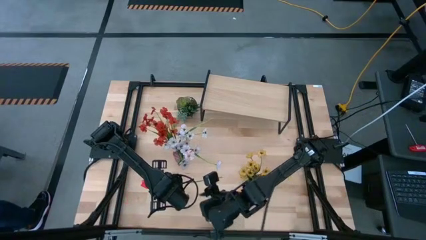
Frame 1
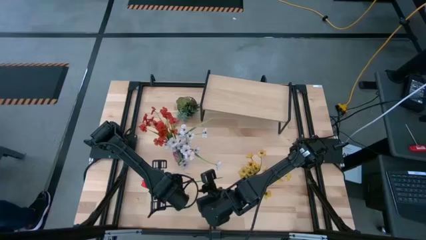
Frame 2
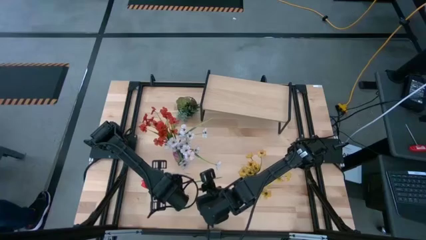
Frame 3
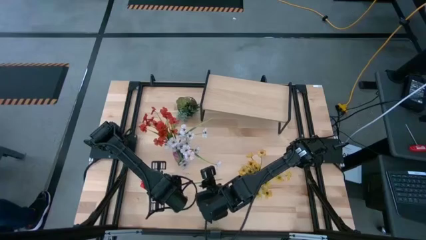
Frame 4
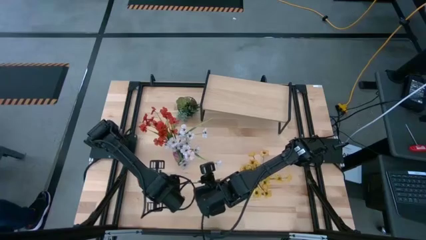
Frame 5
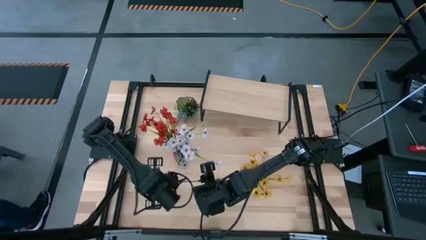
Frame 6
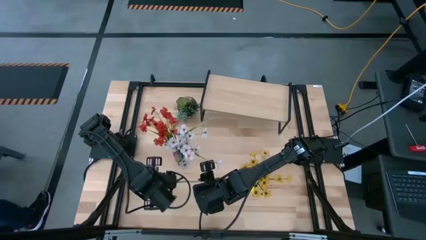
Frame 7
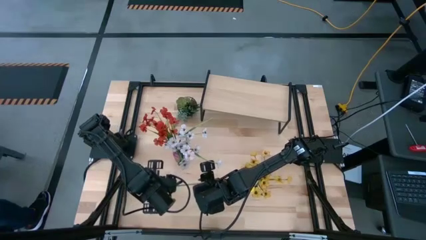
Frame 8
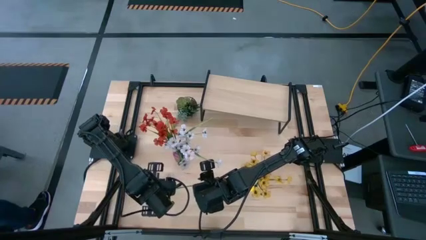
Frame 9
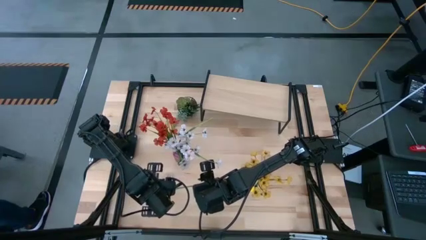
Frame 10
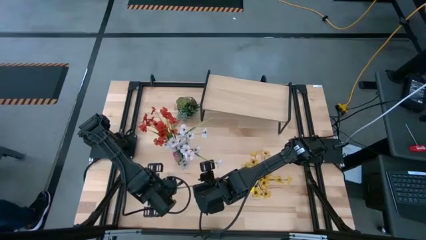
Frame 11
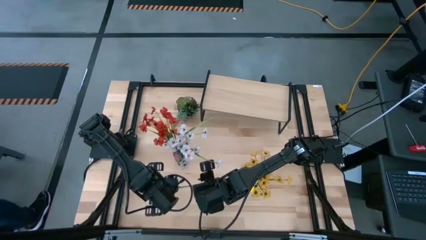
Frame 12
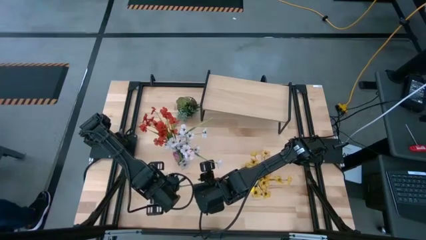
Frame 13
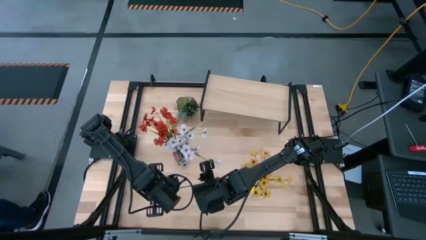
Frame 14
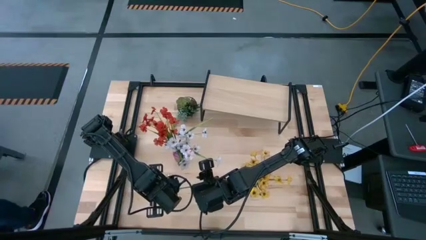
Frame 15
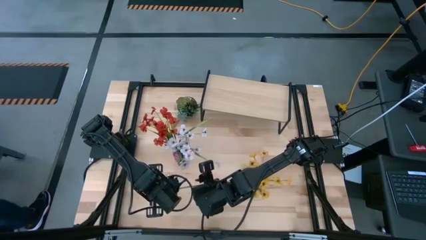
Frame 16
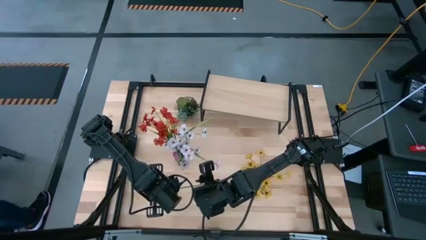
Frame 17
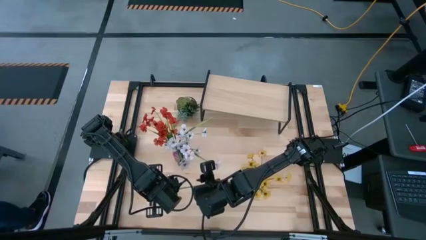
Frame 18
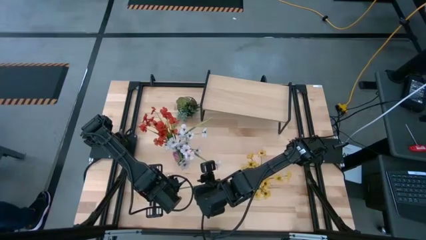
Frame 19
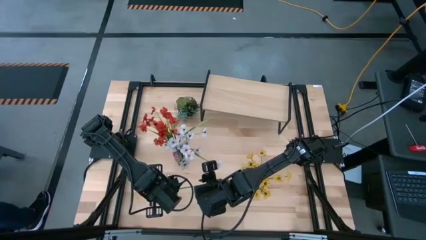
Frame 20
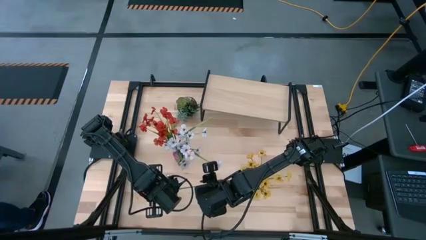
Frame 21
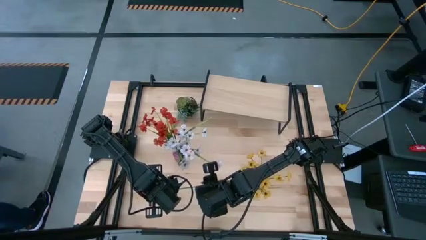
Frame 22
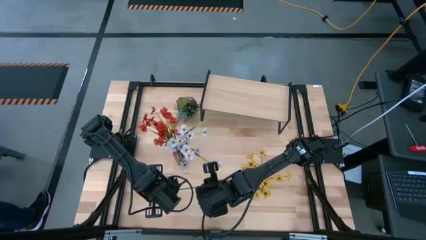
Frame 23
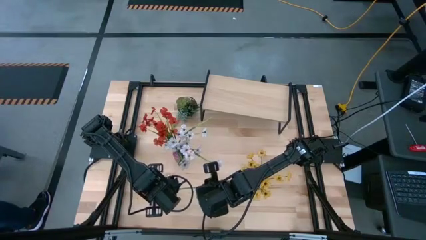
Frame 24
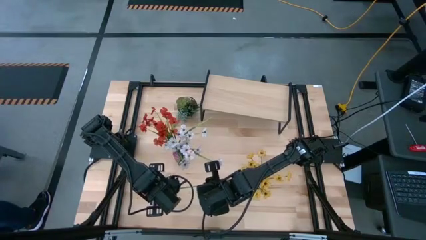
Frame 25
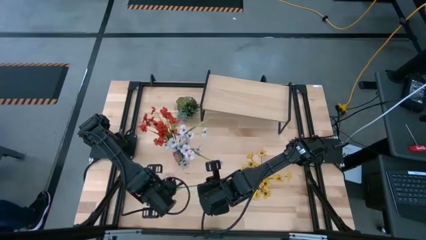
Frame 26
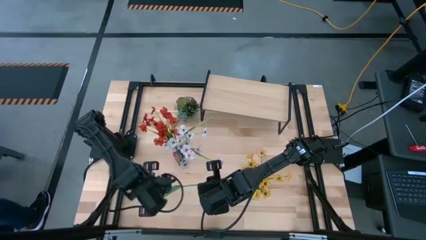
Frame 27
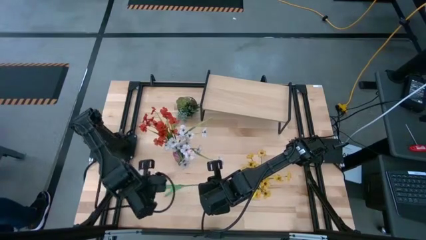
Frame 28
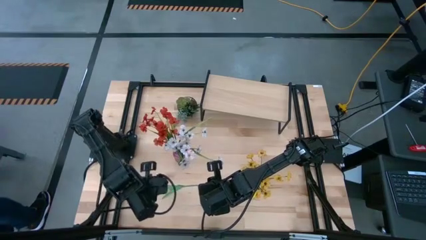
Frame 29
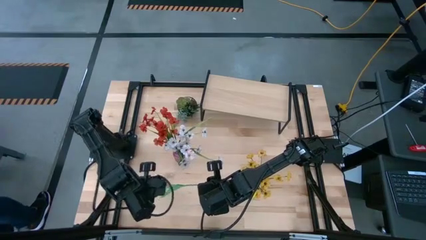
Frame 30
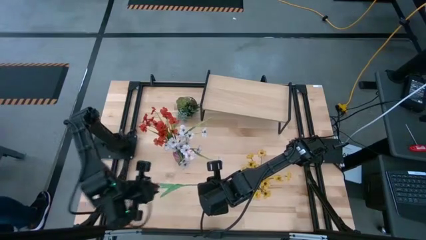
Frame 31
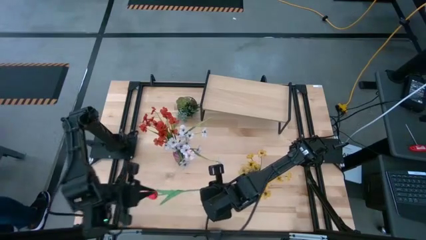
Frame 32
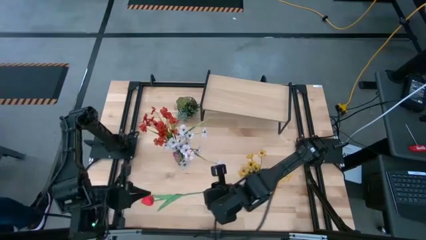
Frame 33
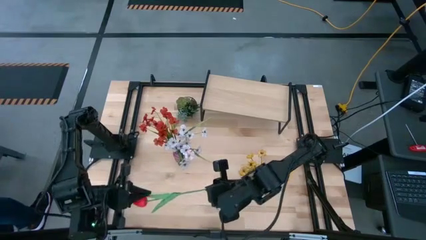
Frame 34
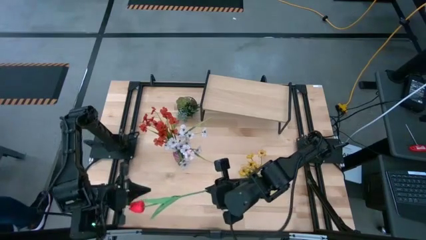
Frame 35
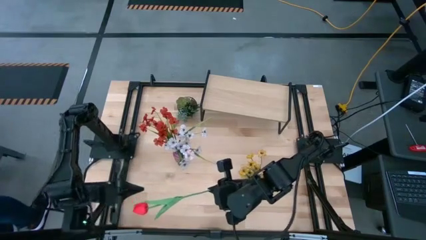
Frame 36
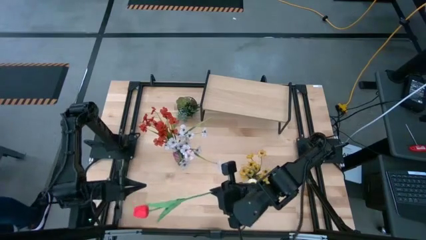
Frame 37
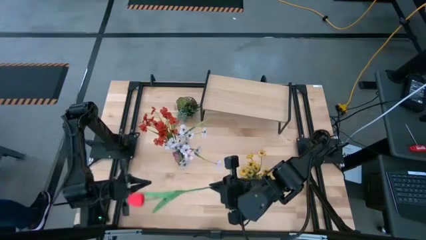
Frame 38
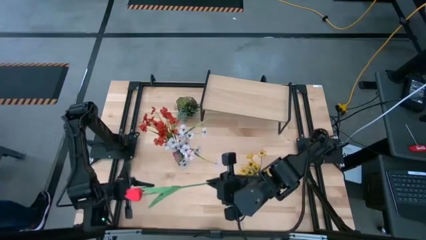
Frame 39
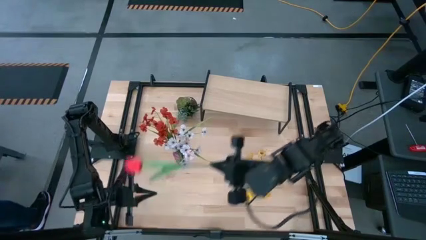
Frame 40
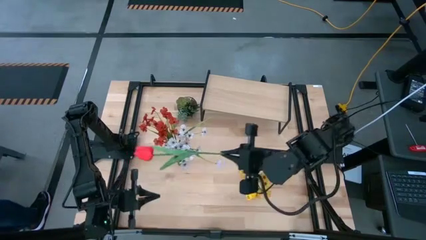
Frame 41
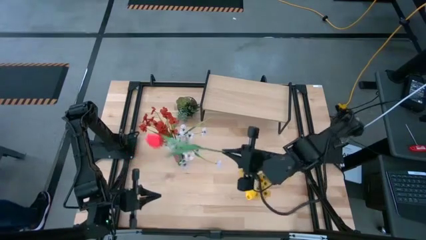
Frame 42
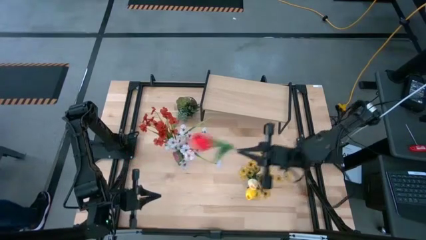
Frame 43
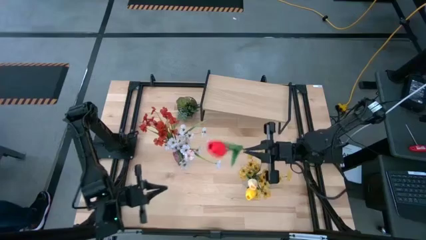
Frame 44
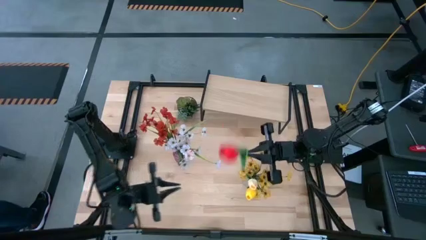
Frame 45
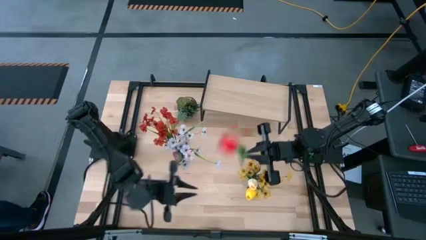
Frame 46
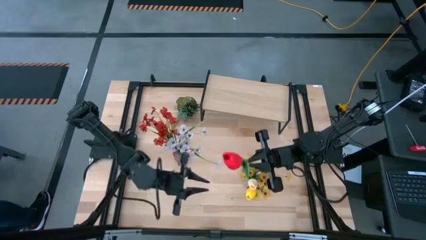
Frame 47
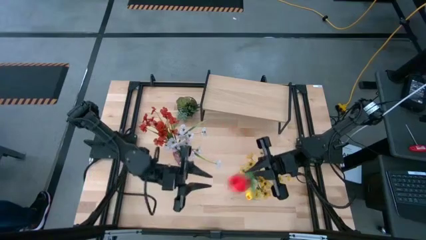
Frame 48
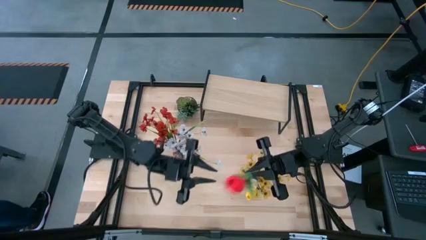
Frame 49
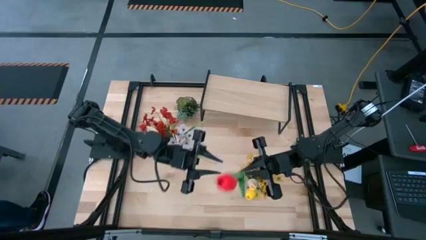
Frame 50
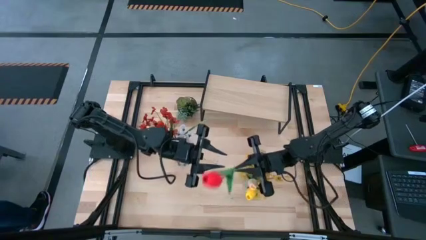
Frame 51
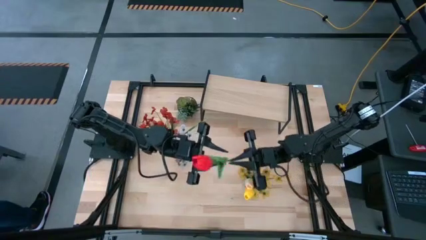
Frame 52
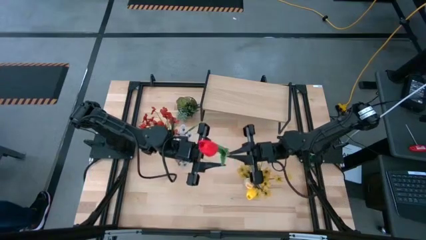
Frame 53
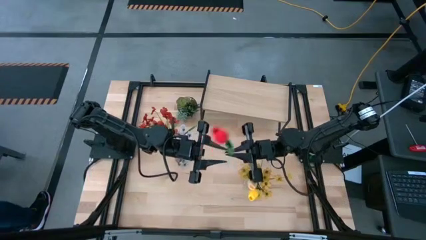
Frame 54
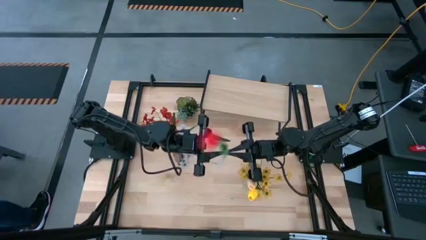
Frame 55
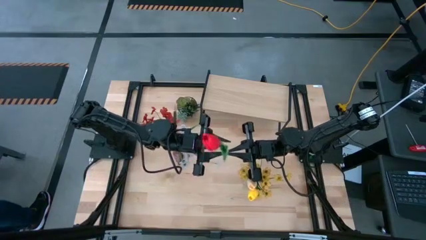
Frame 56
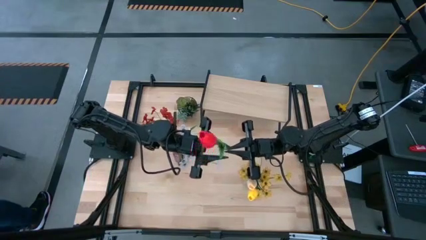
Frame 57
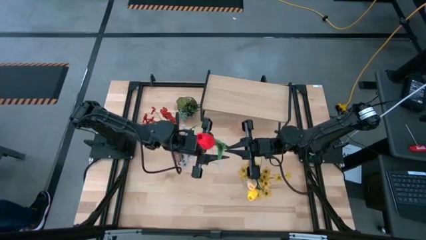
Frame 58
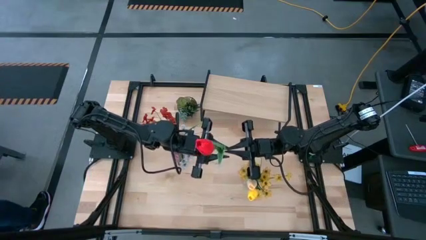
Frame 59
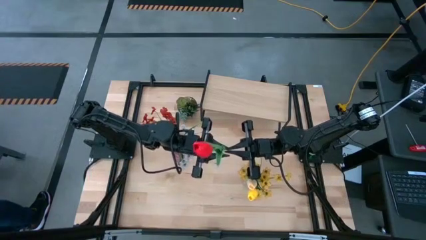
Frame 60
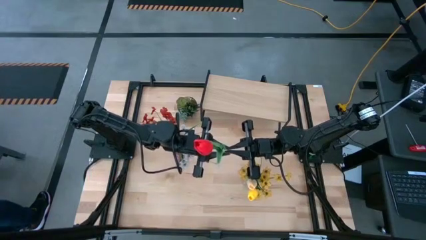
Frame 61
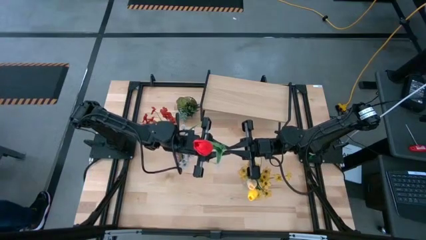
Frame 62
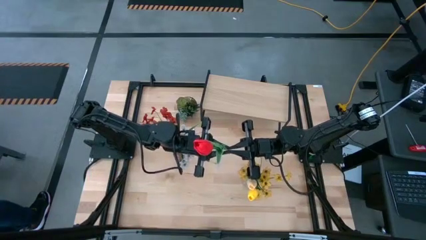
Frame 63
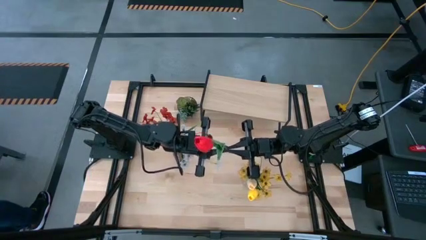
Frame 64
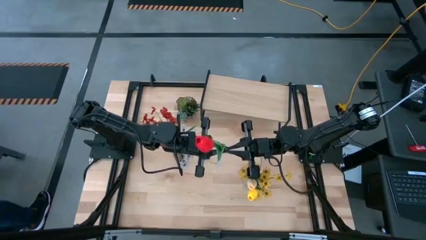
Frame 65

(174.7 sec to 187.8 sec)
Task: Pick and place flowers into a vace then onto a shelf
Put the red flower into the violet vase

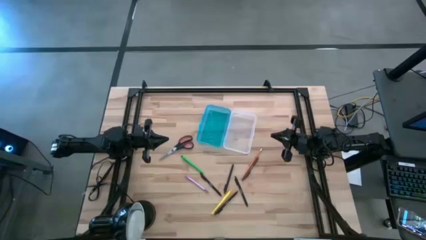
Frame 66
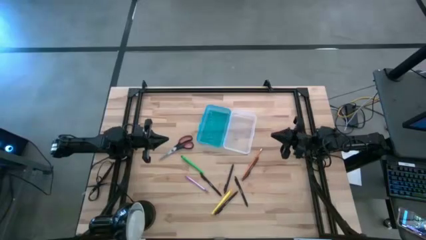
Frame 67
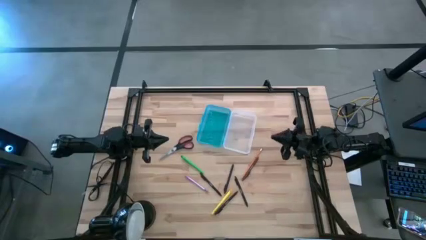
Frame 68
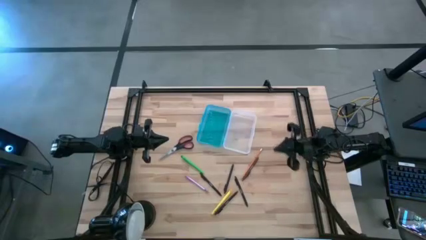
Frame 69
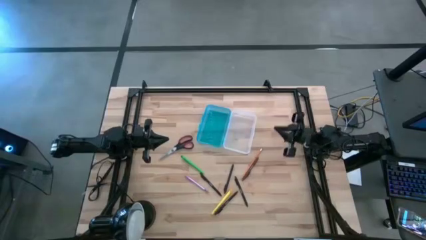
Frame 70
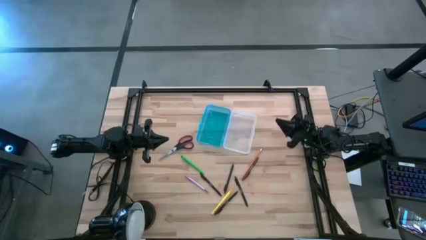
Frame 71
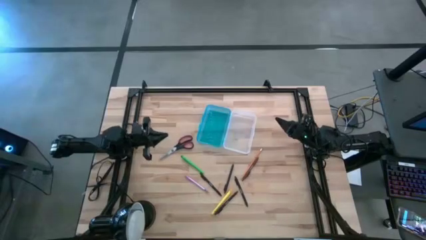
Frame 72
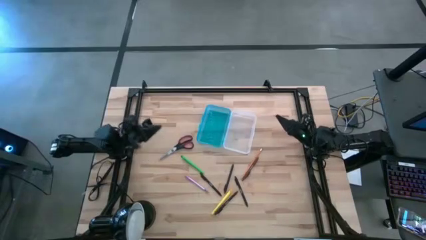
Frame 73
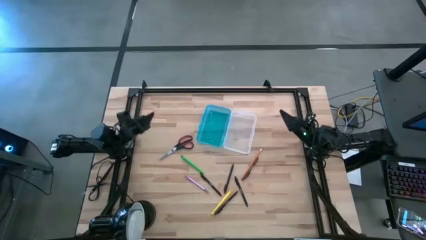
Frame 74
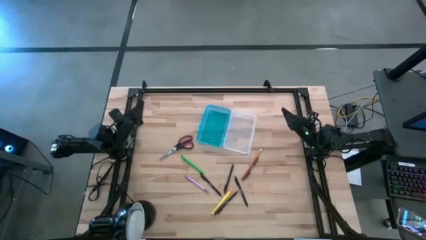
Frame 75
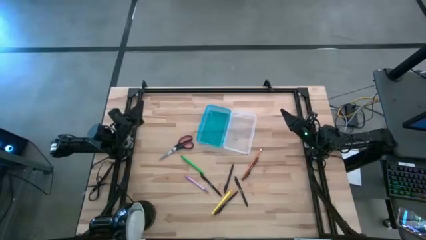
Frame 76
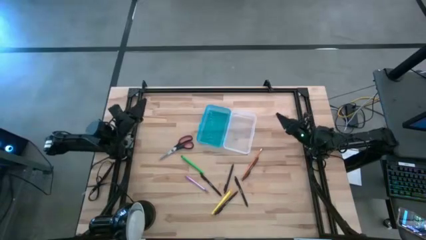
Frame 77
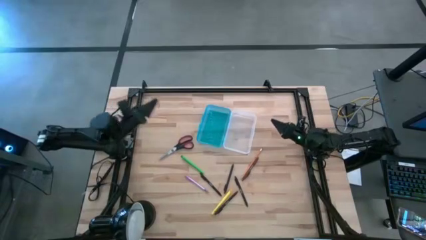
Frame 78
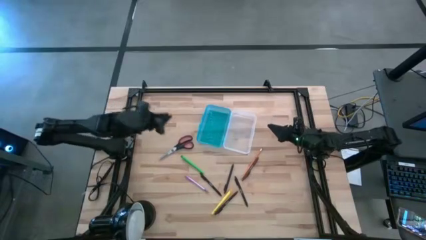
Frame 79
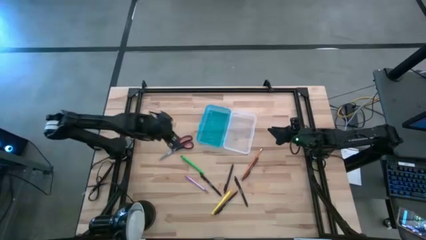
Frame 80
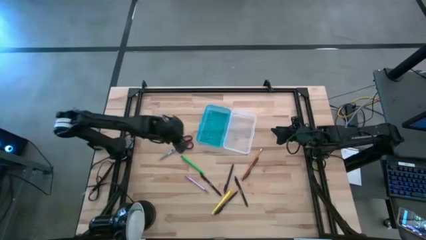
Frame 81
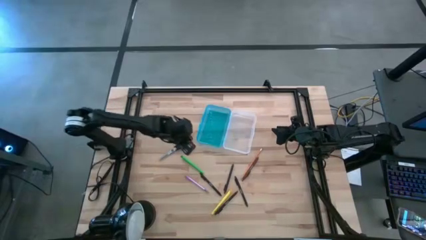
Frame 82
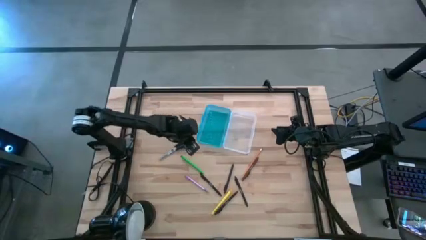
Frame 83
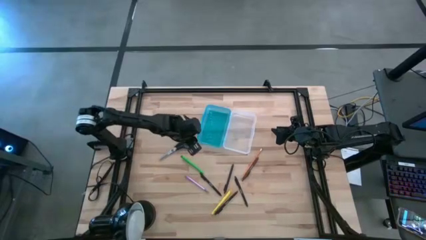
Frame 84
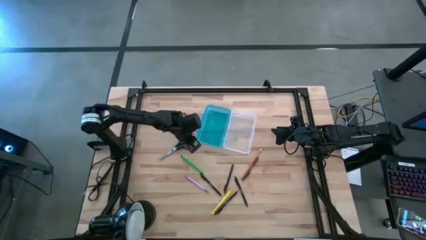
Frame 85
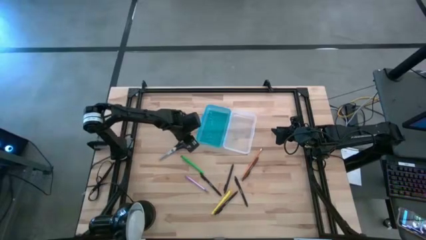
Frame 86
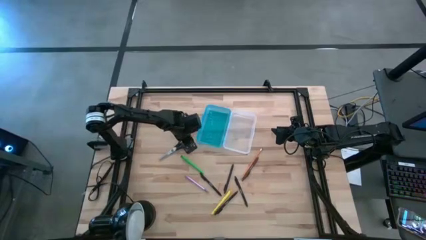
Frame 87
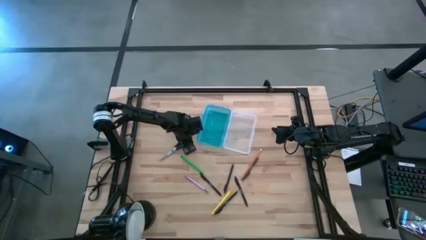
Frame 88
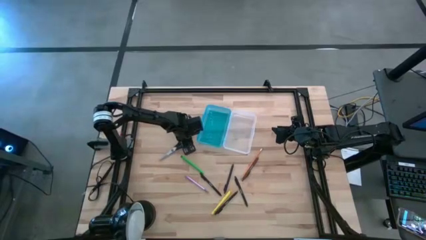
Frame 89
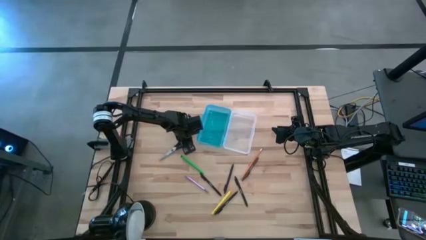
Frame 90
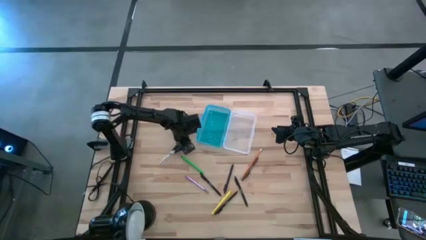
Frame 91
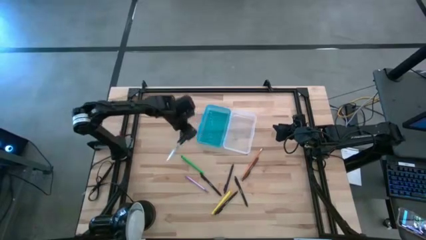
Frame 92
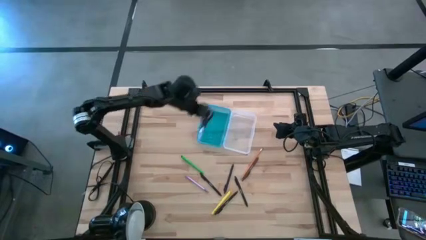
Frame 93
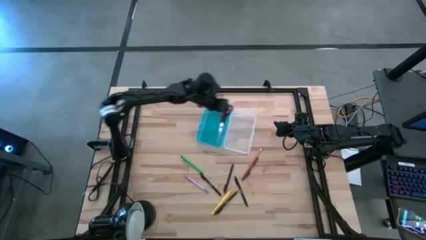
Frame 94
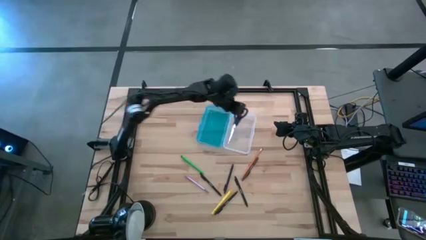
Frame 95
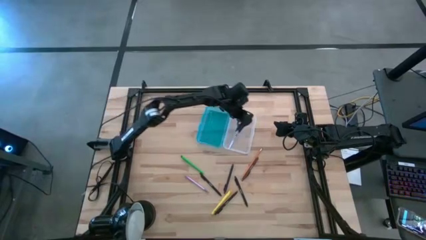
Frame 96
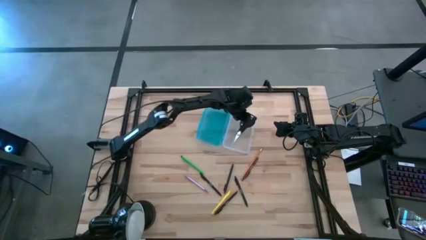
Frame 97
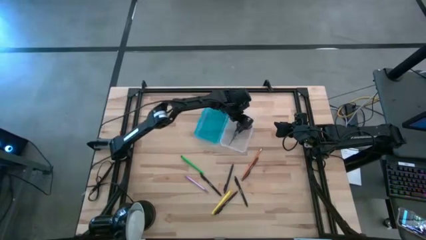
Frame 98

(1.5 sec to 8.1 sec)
Task: Pick & place school supplies into a supply box
Put the black scissors into the blue supply box
